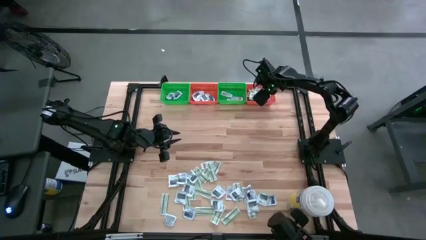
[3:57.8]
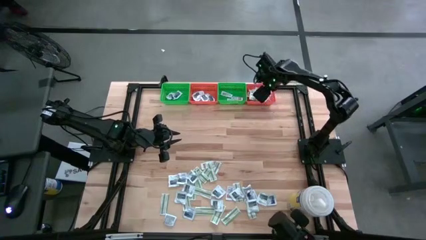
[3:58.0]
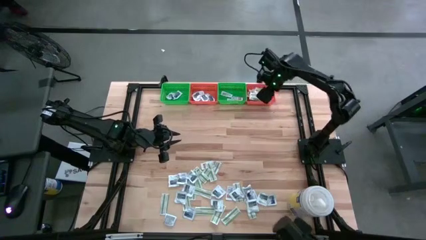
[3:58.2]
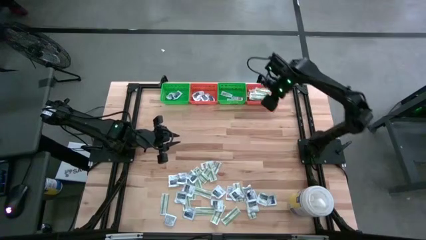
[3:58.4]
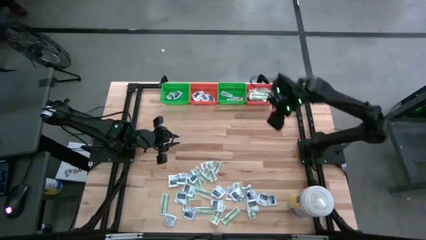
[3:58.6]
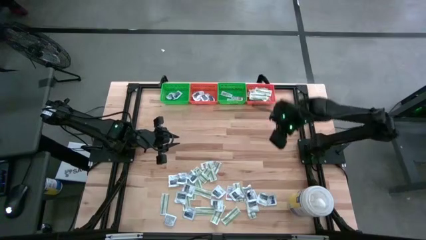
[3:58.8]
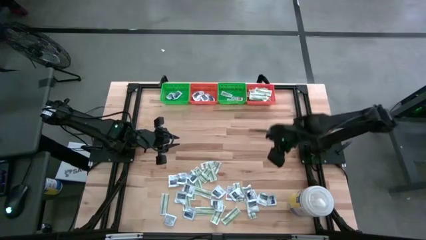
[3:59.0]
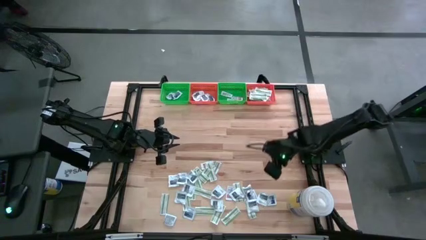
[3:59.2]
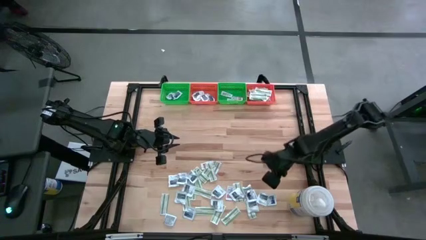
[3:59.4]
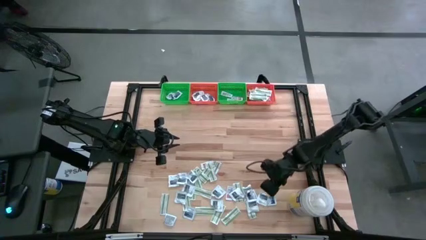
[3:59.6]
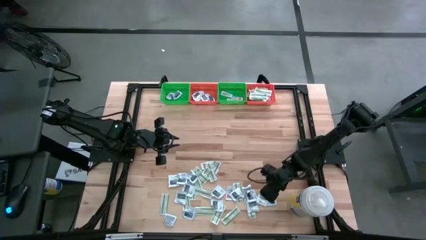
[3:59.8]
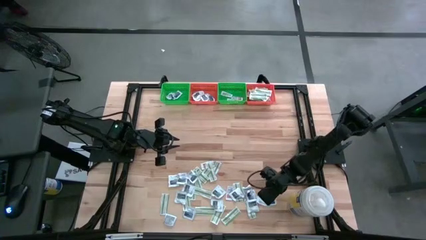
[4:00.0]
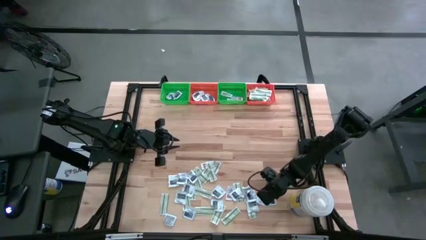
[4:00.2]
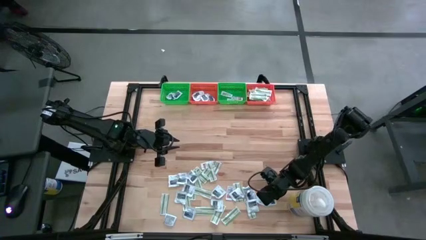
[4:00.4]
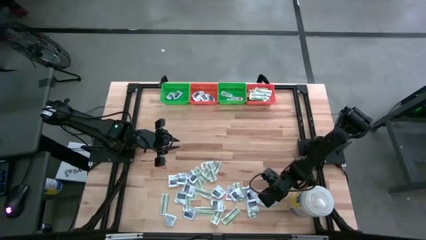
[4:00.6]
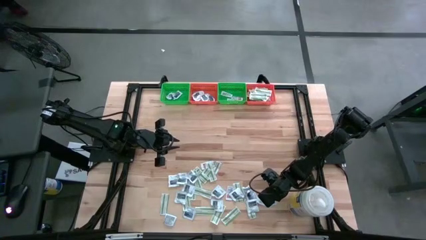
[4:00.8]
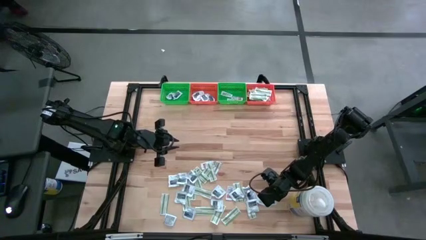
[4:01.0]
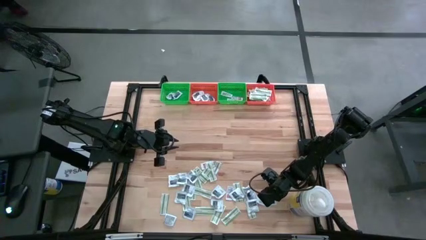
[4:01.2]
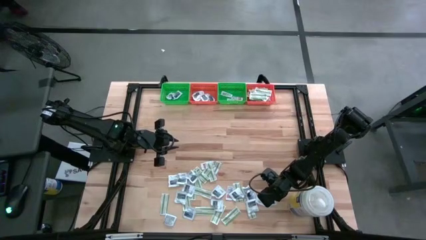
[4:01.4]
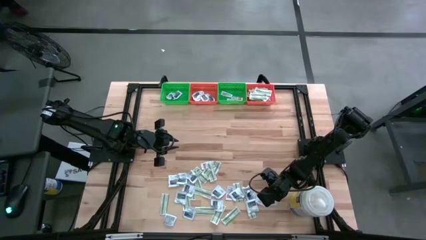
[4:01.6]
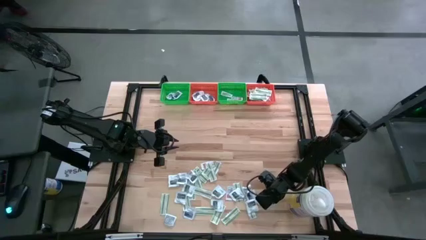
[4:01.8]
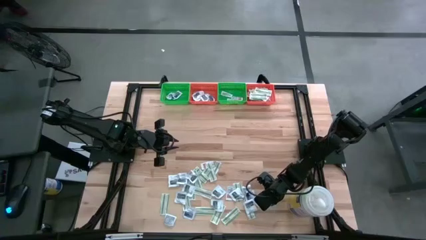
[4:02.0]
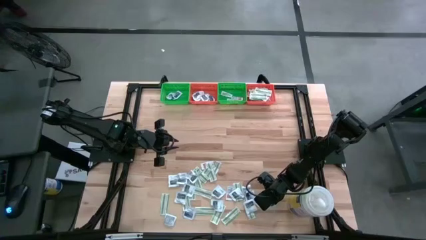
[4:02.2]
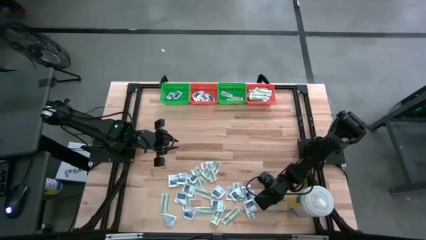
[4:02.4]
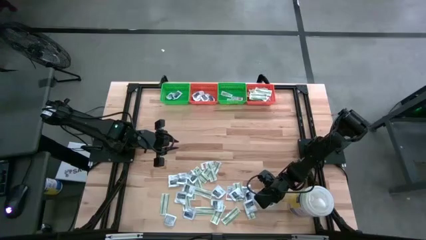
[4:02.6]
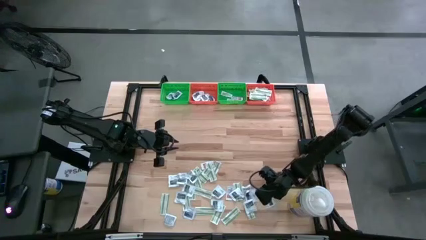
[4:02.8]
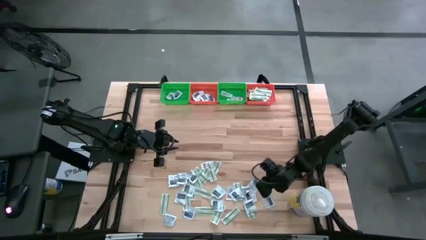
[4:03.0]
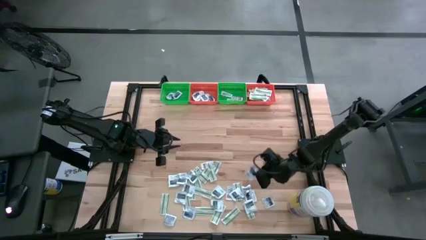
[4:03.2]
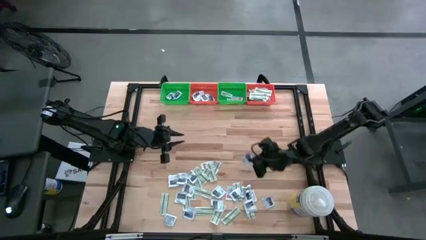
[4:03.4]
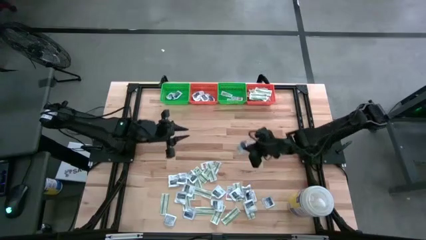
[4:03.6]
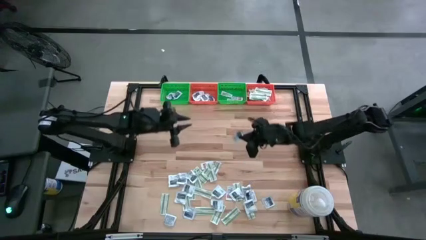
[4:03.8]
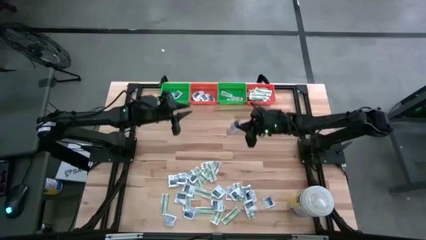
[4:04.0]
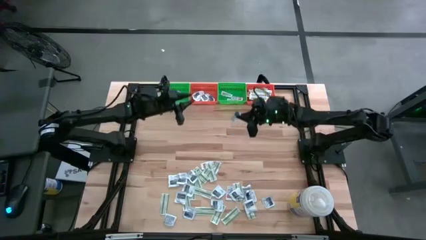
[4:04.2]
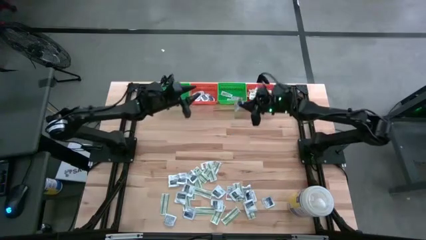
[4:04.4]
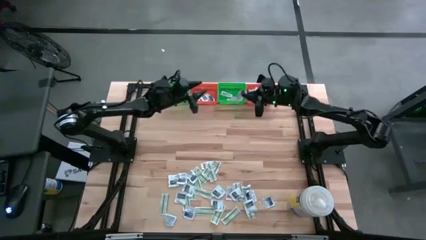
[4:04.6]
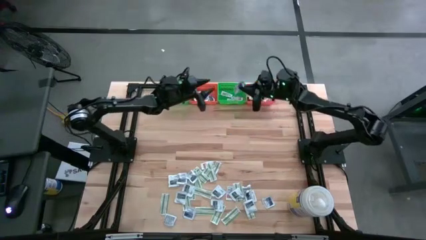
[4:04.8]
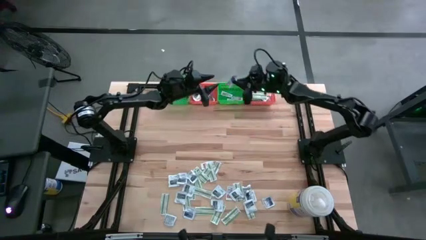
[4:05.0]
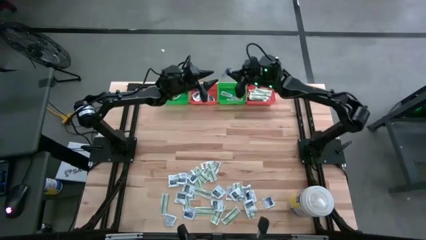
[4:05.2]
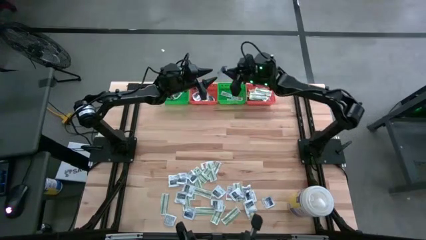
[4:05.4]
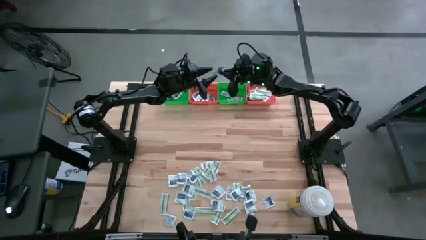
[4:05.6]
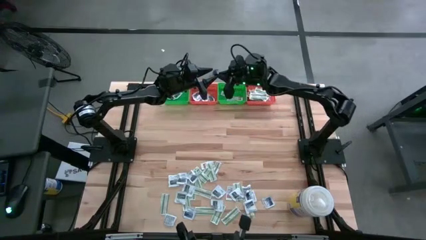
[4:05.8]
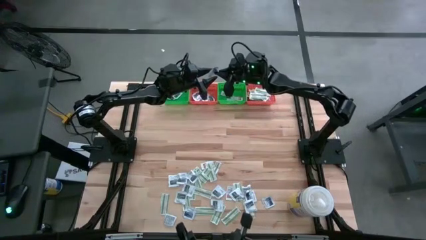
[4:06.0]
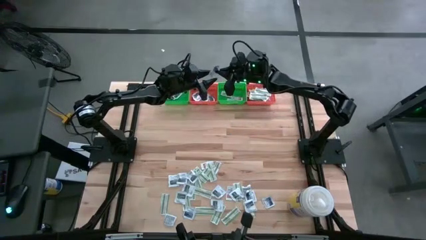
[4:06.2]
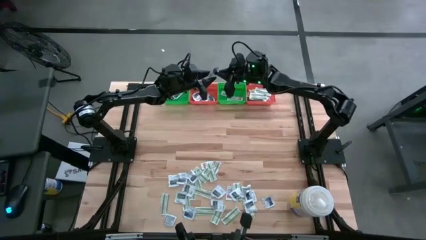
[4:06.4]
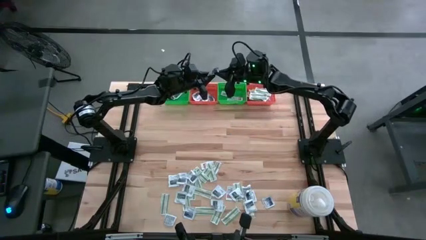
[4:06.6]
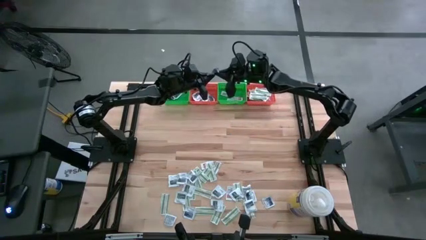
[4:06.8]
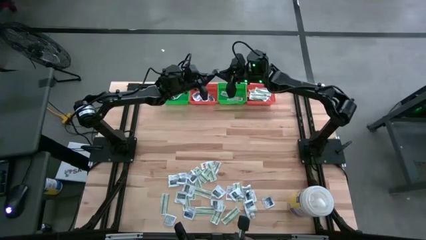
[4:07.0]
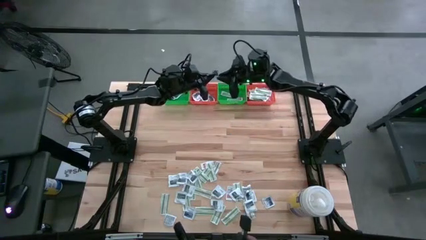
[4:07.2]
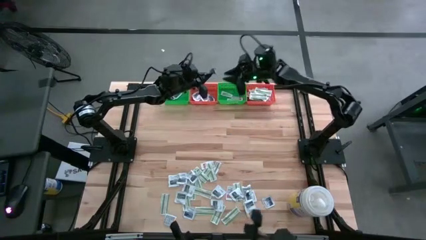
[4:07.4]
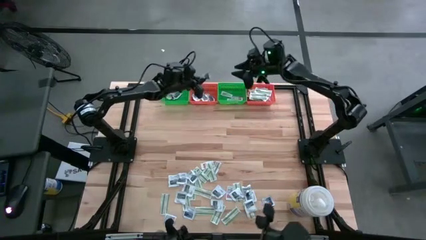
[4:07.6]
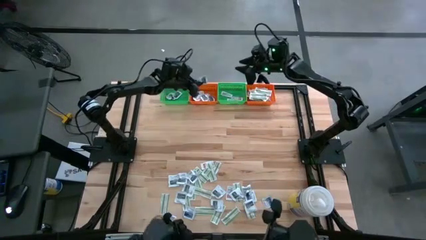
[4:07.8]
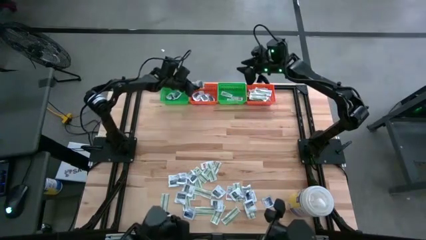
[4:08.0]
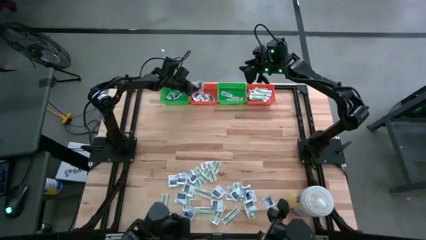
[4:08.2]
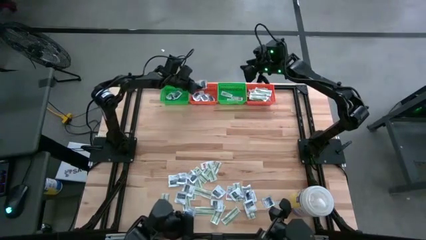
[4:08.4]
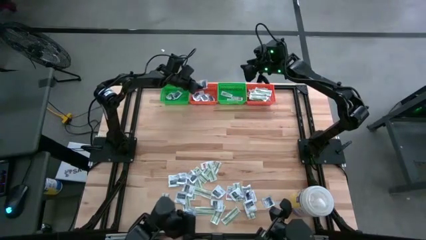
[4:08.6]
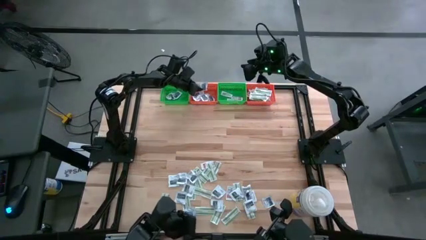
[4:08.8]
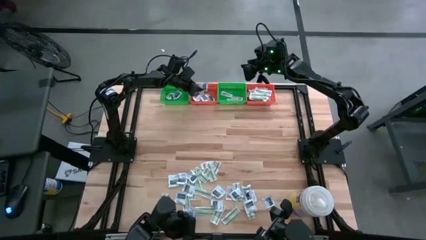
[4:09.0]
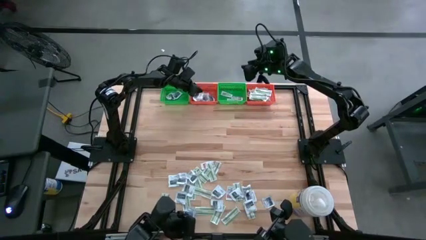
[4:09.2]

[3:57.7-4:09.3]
Task: Pick & Place First Aid Supplies
Put the gray towelette pack in the left orange bin

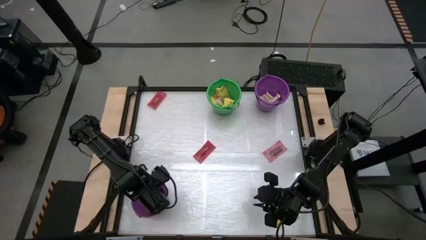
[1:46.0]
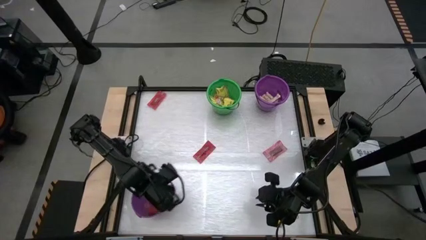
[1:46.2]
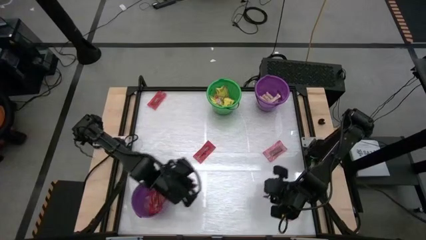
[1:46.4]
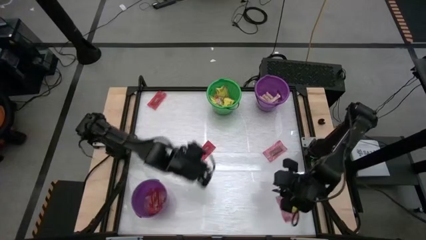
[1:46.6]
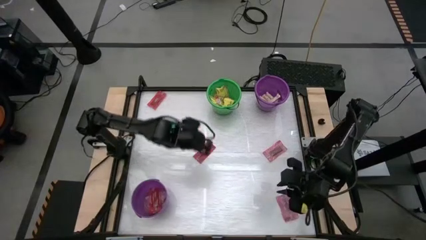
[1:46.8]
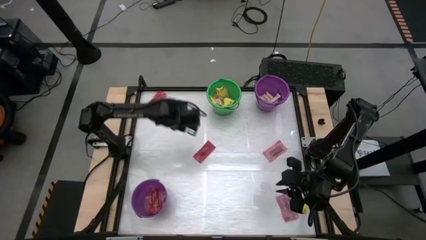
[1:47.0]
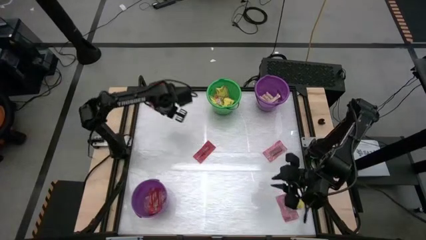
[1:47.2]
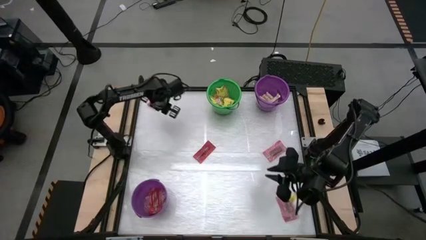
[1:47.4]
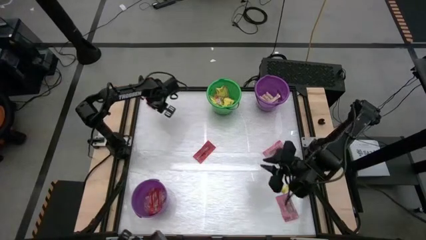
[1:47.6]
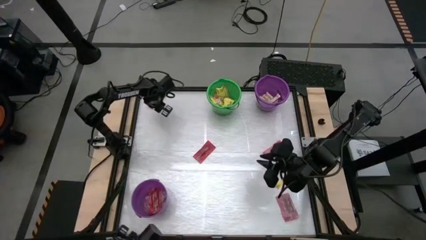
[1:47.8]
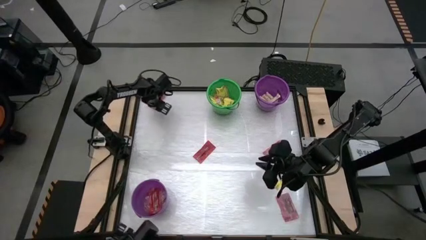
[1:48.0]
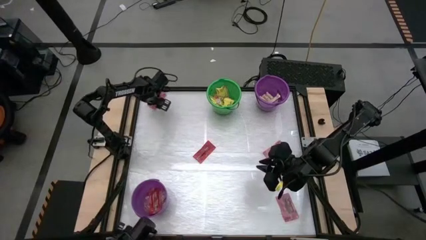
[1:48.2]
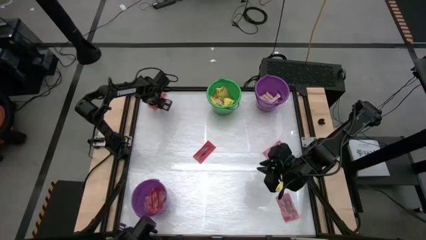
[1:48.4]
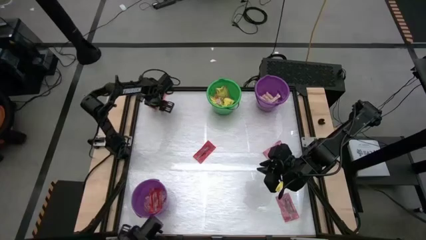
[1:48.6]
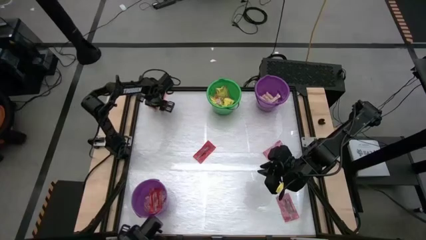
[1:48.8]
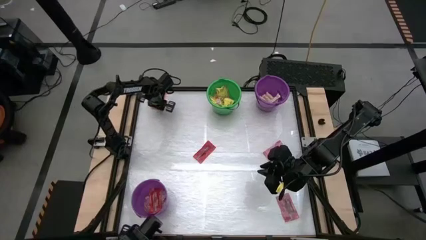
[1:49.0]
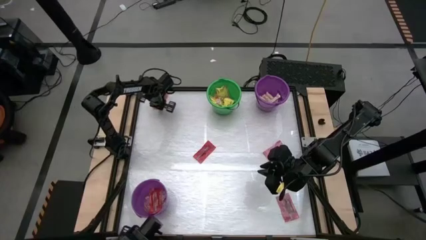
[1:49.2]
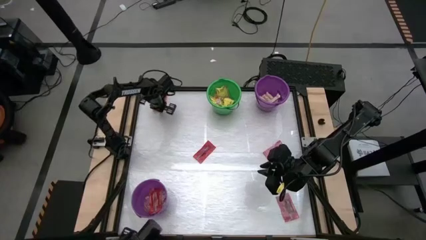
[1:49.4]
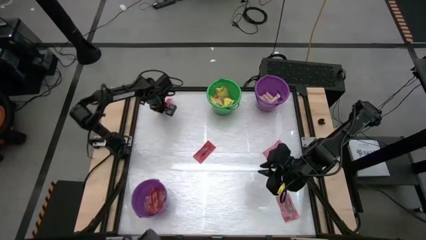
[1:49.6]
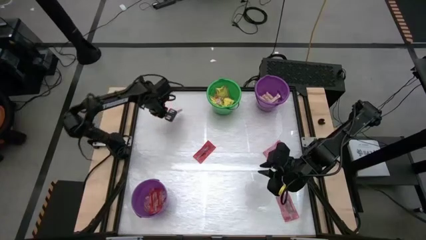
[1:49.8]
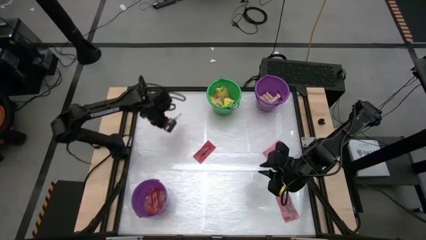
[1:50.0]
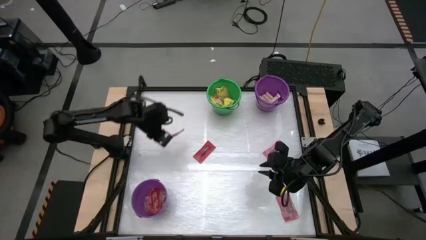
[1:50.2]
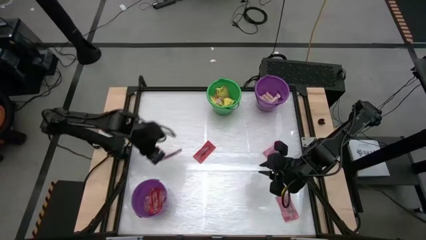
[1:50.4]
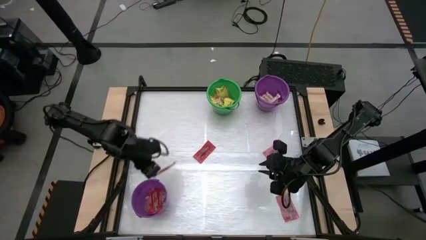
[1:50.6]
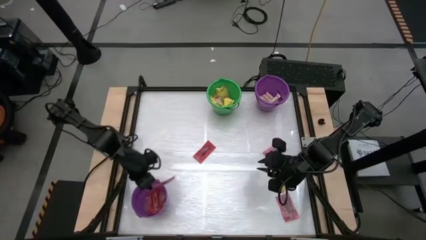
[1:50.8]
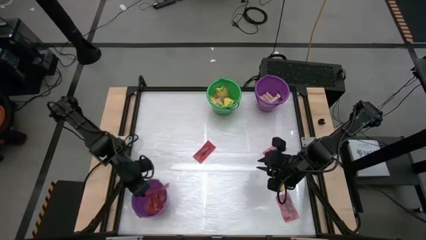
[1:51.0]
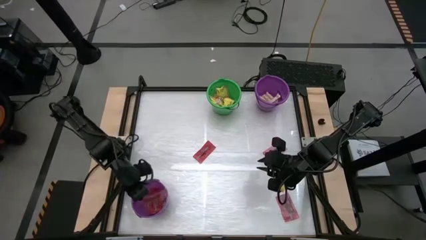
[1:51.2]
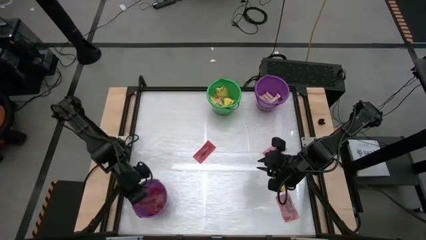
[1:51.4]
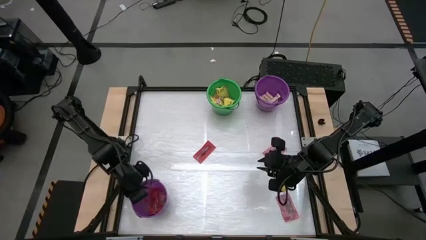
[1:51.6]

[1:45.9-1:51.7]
Task: Sort candy by brand, put in halloween buckets
Put the red candy into the bottom violet bucket
